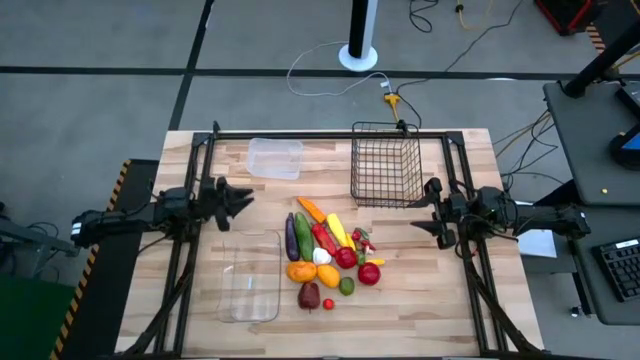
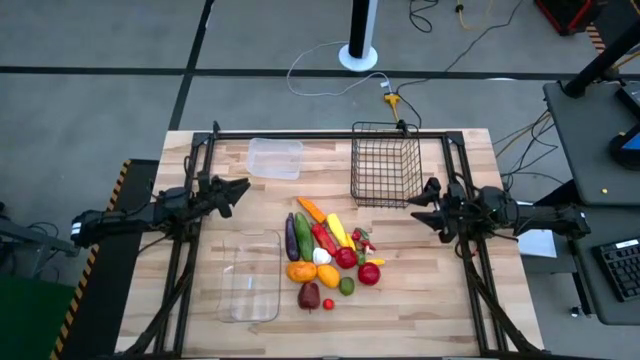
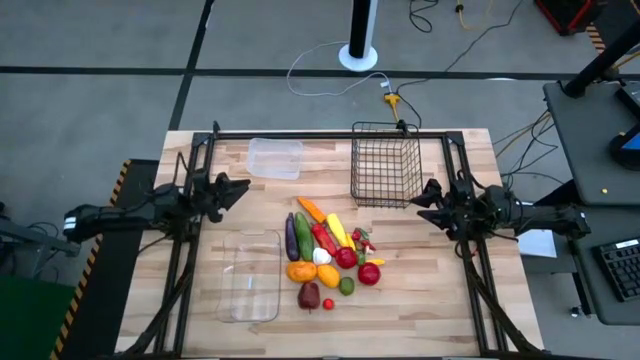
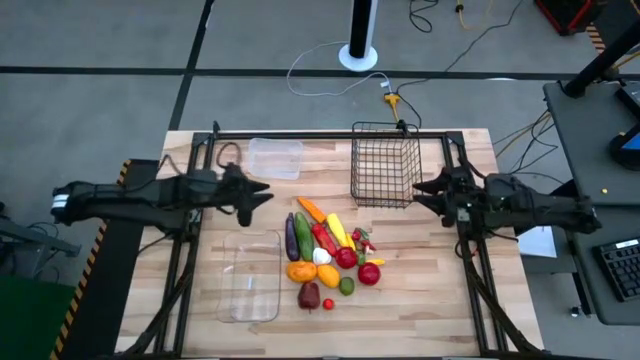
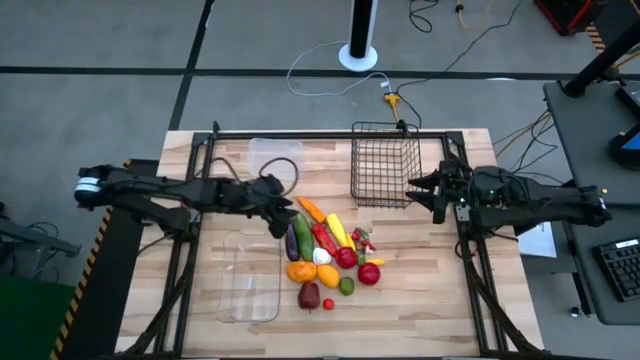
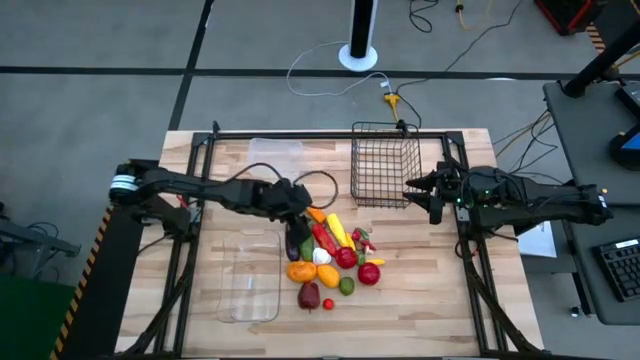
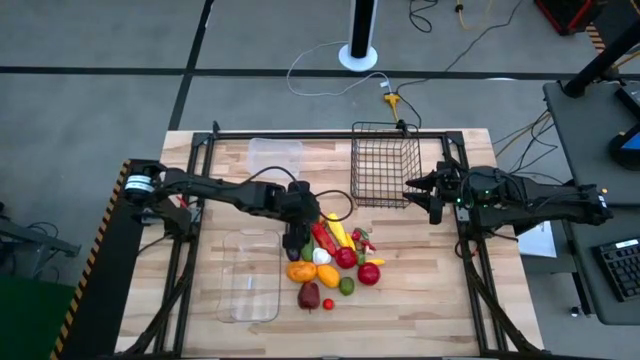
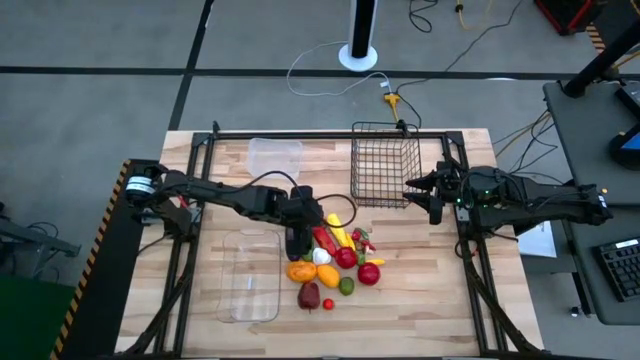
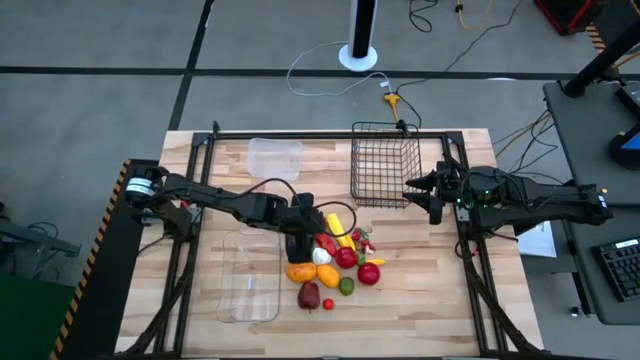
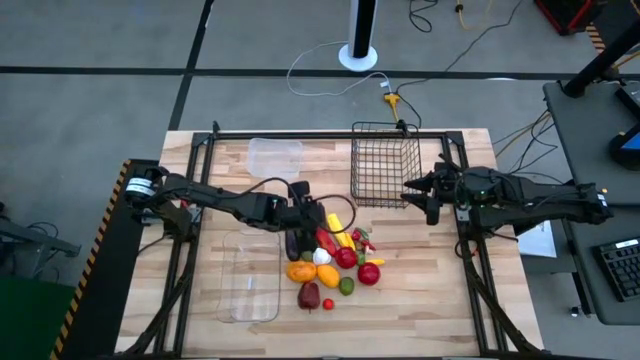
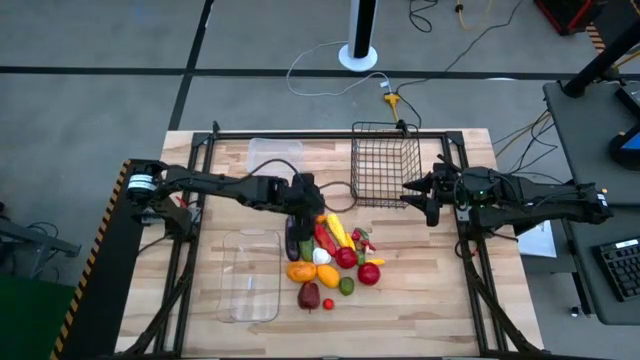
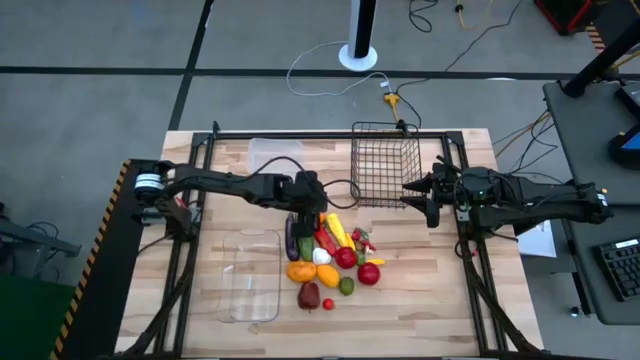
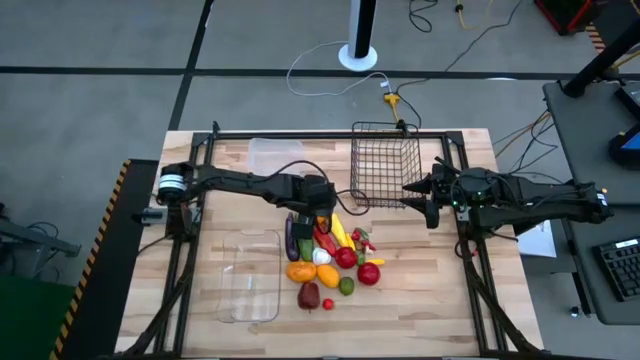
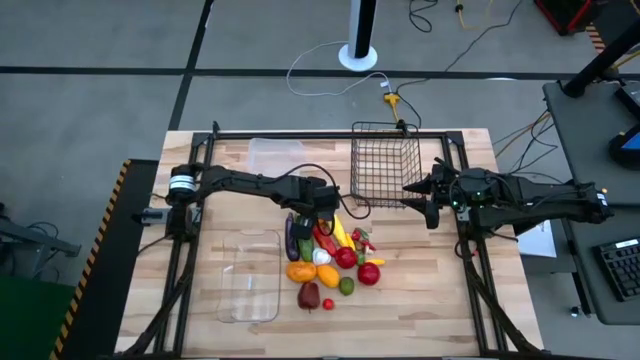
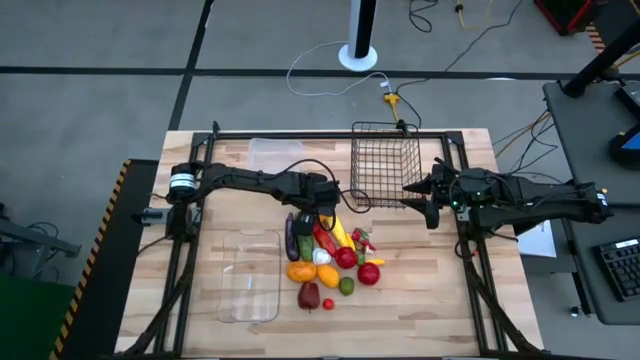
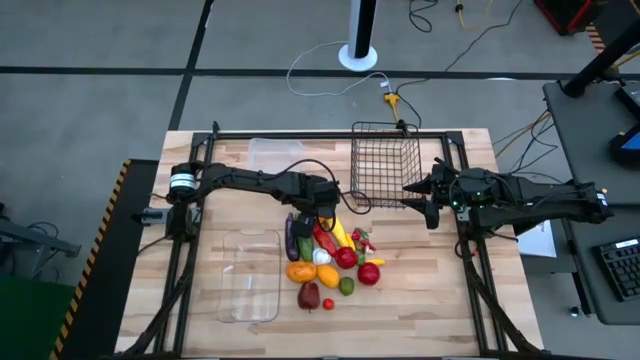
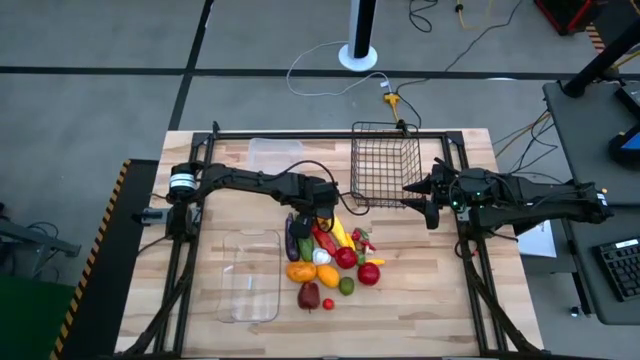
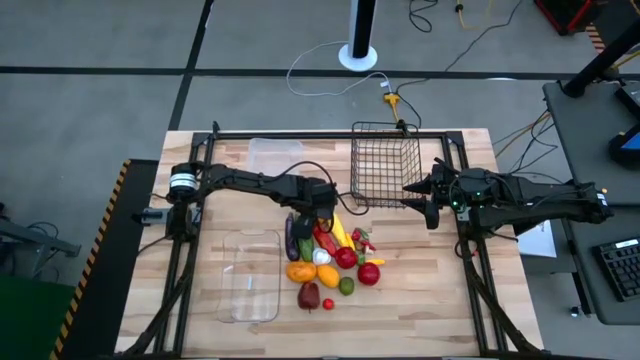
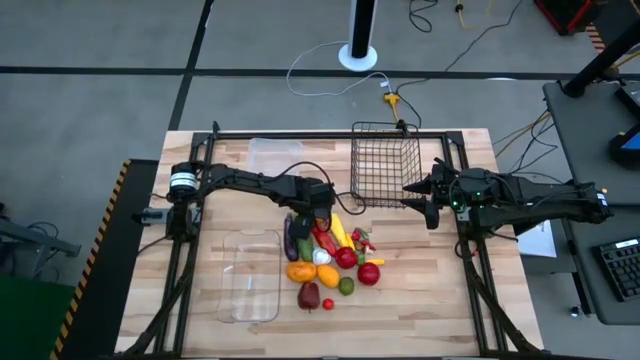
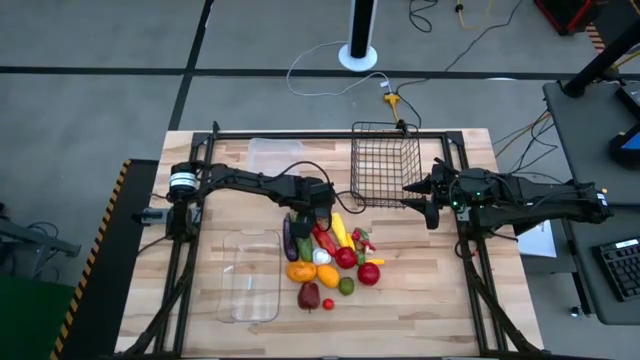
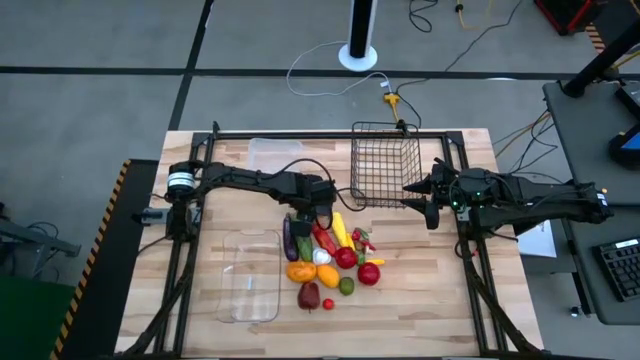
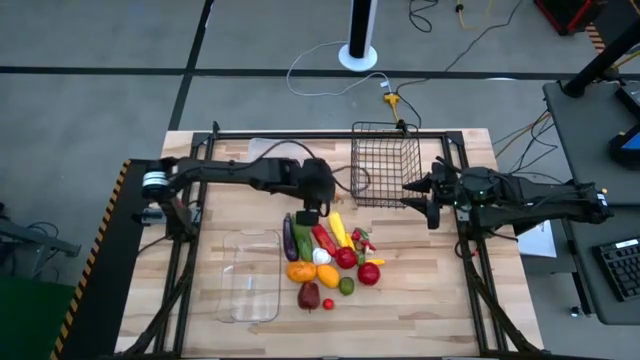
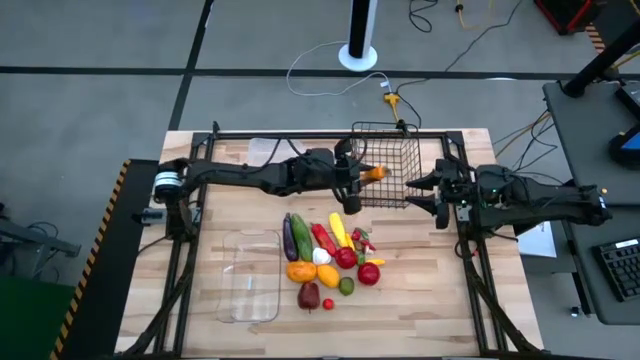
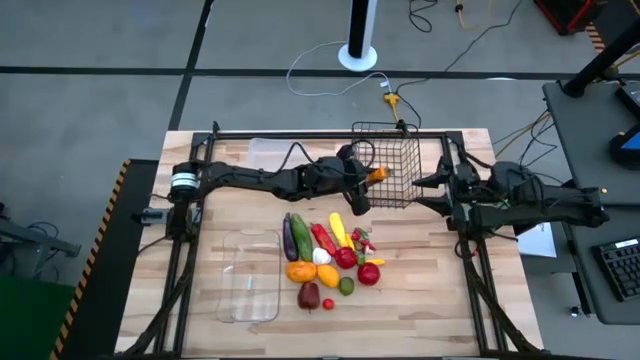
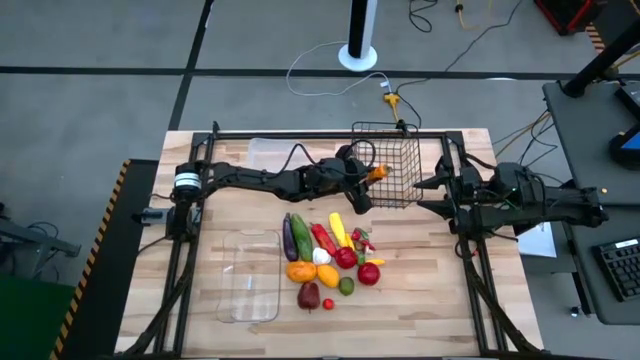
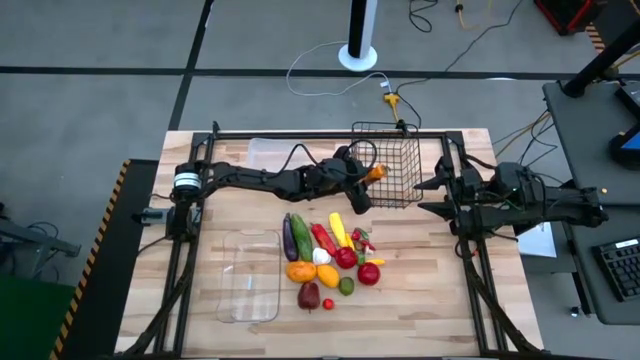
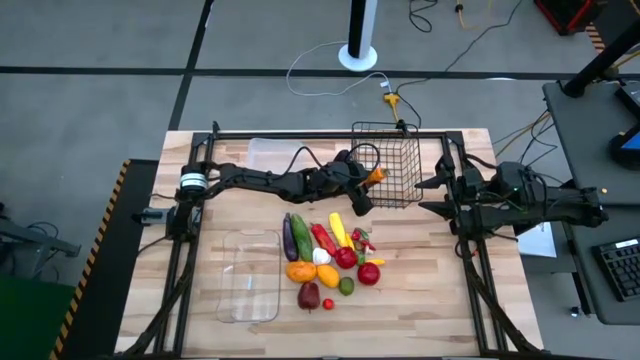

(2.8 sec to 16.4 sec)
Task: Sort produce into baskets
Put the orange bell pepper into the wire basket

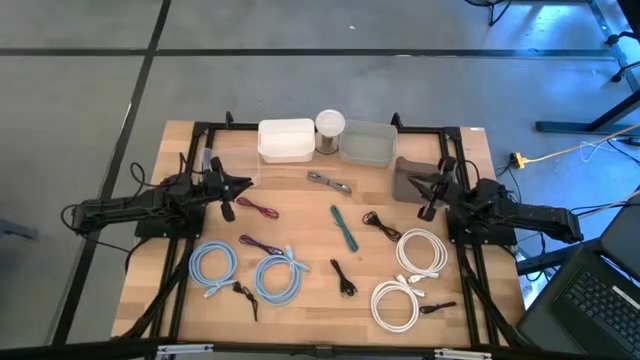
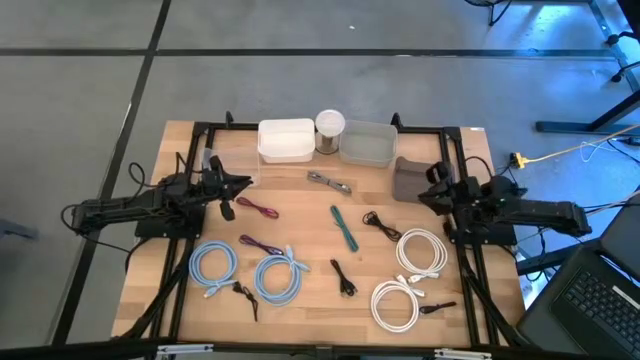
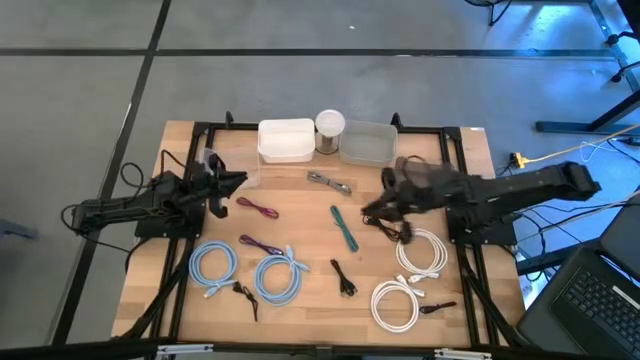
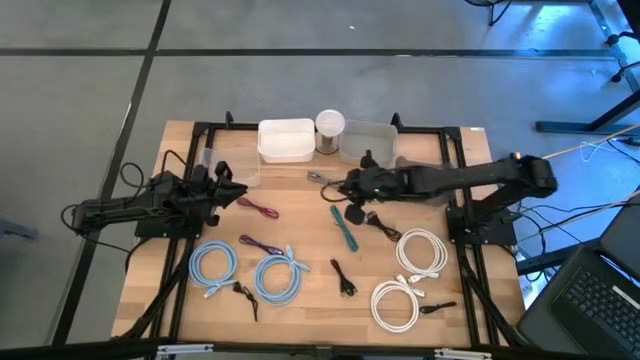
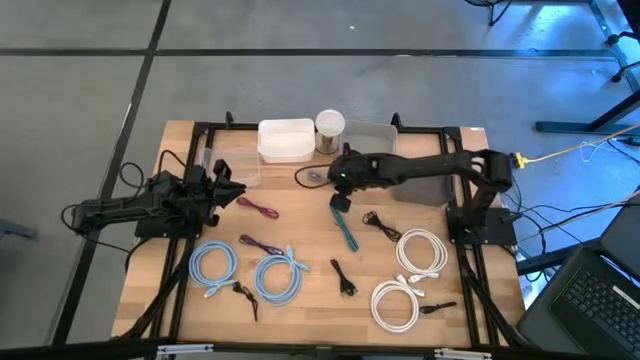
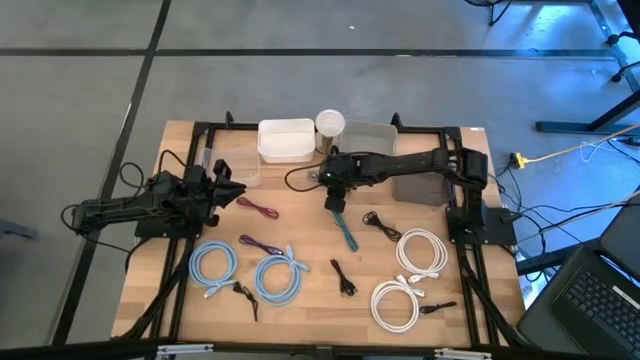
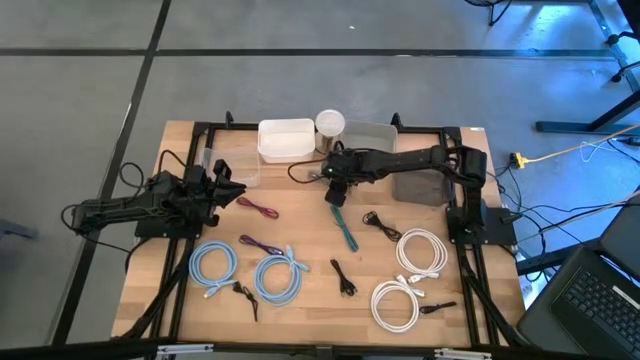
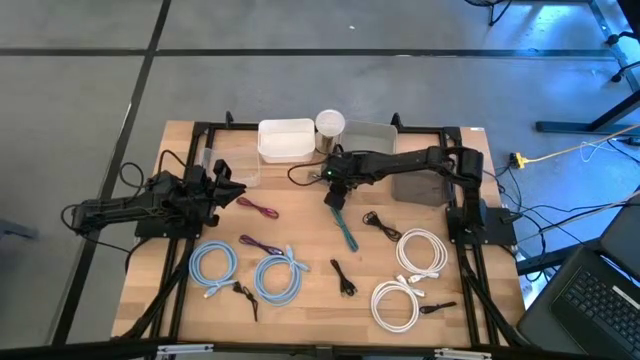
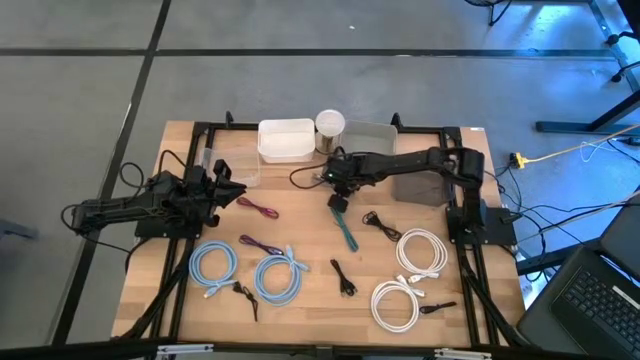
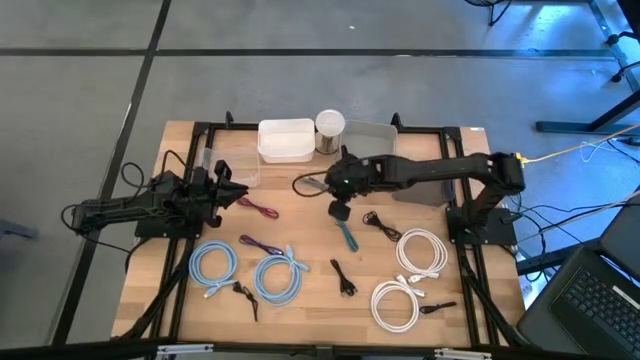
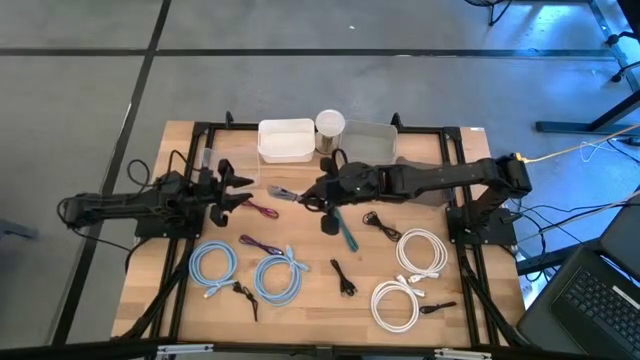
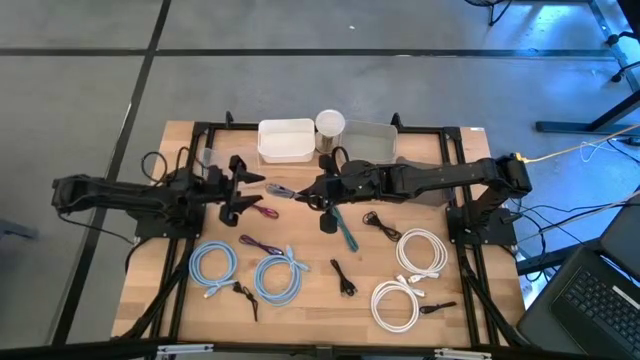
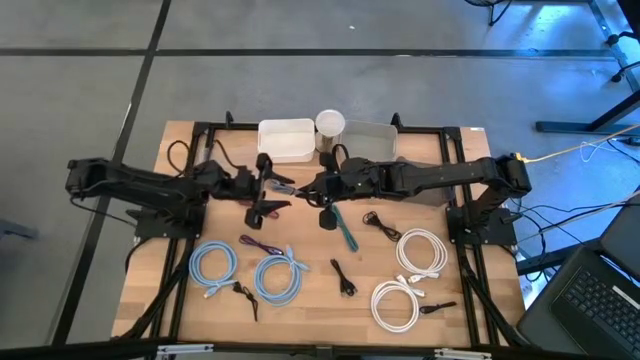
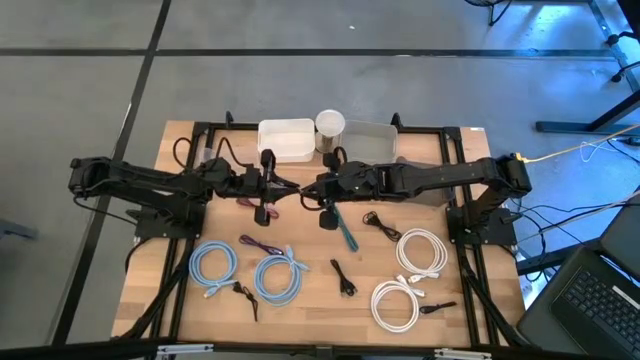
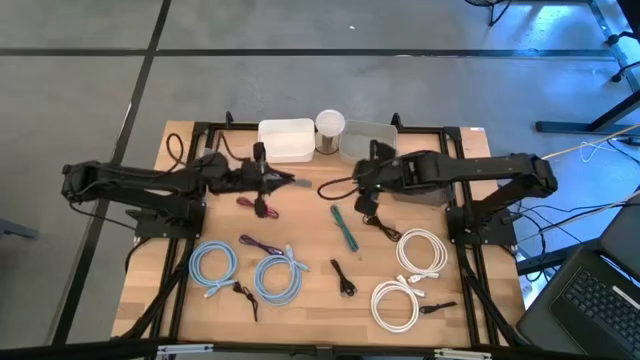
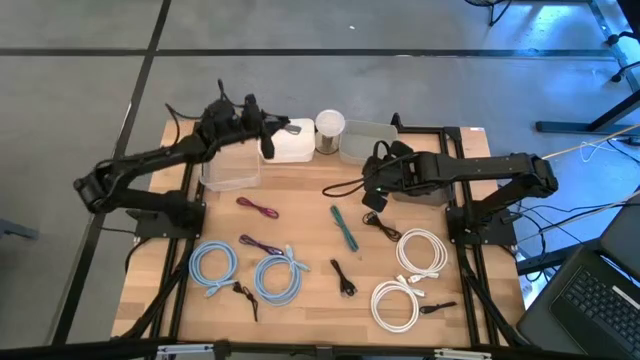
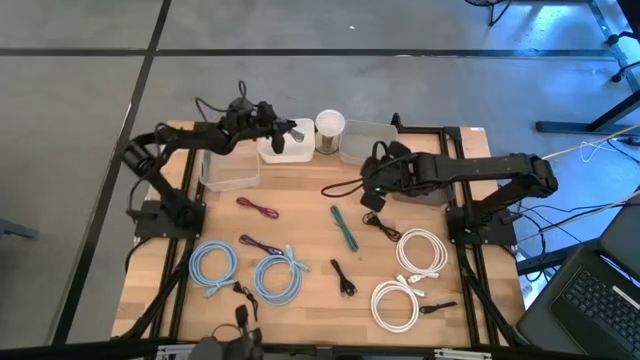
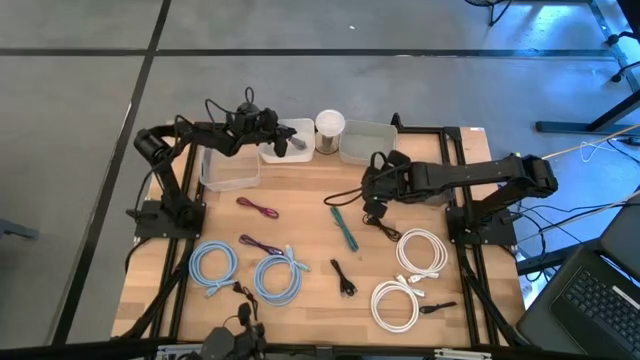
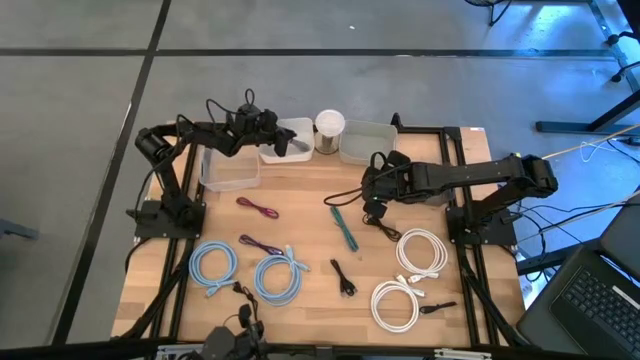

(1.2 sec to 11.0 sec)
Task: Pick & Place USB Port
Put the black and white USB cable into the white bin
